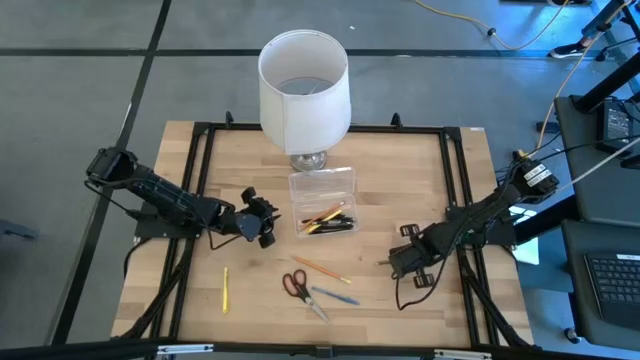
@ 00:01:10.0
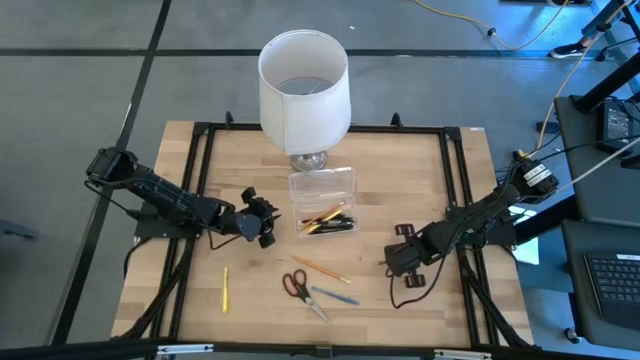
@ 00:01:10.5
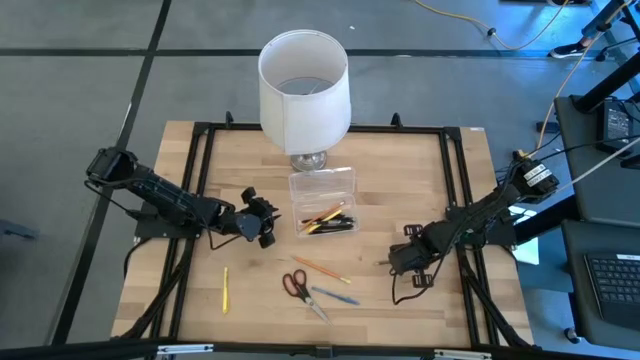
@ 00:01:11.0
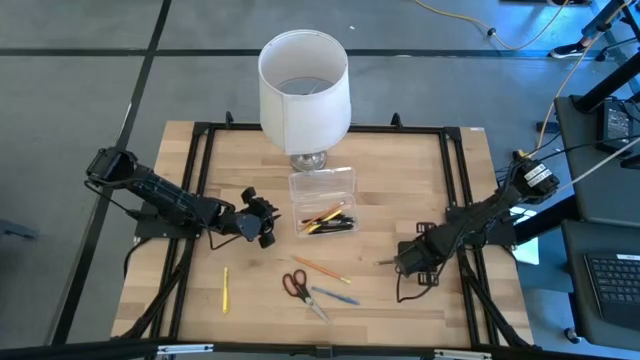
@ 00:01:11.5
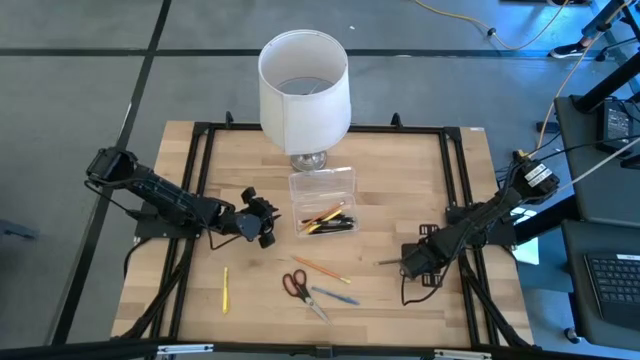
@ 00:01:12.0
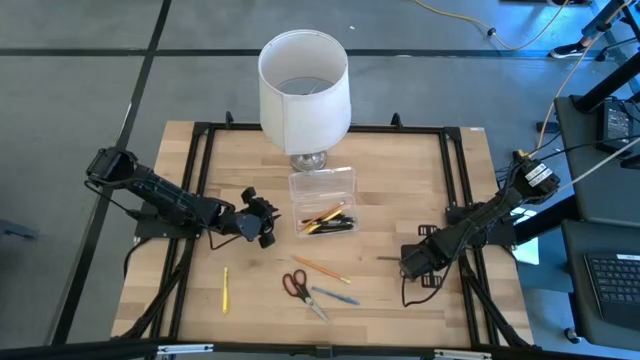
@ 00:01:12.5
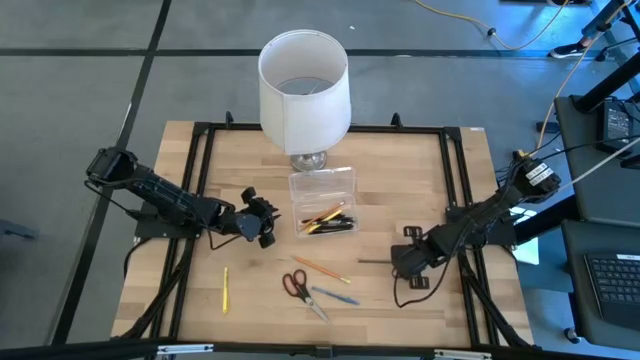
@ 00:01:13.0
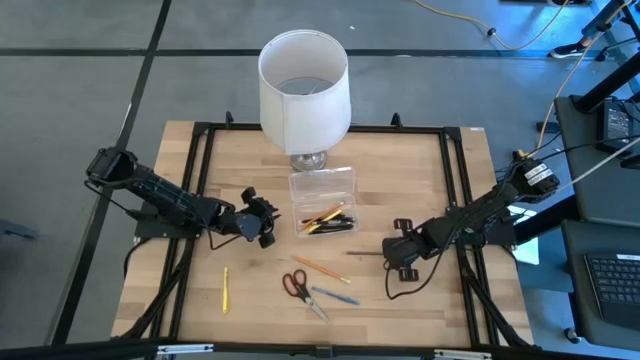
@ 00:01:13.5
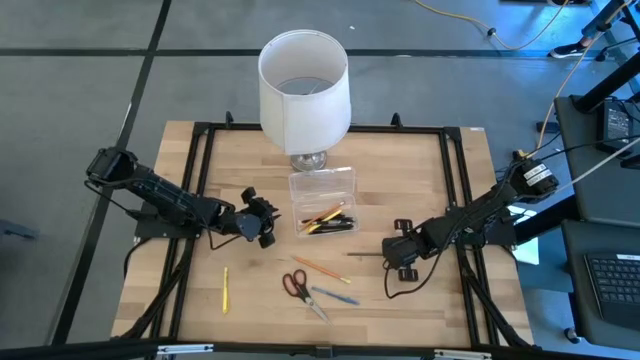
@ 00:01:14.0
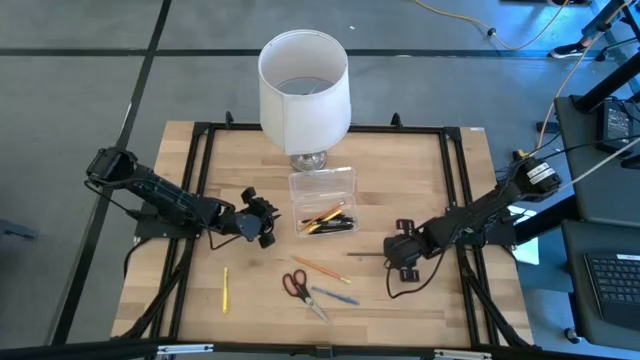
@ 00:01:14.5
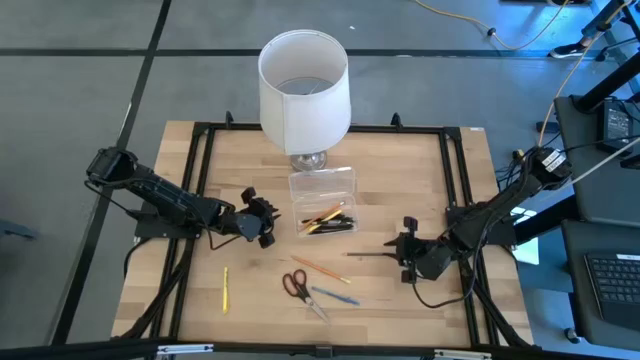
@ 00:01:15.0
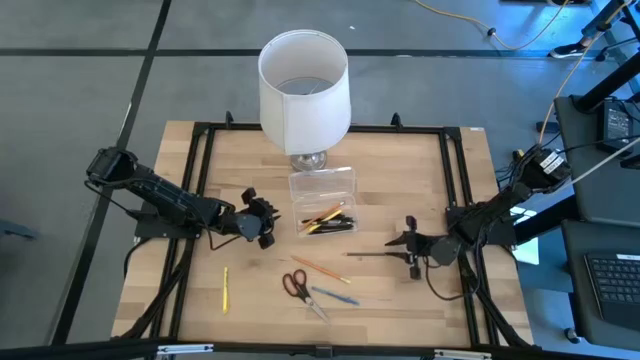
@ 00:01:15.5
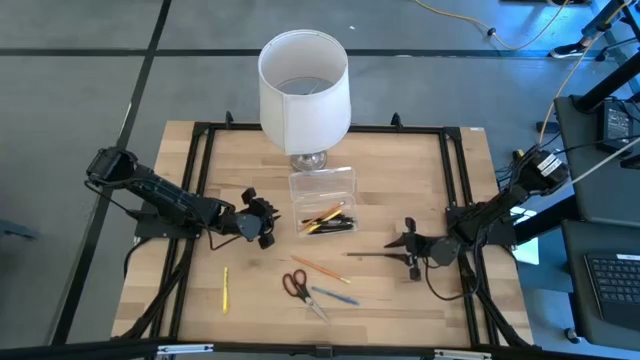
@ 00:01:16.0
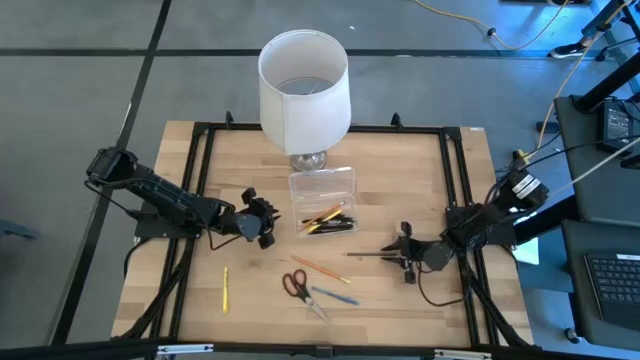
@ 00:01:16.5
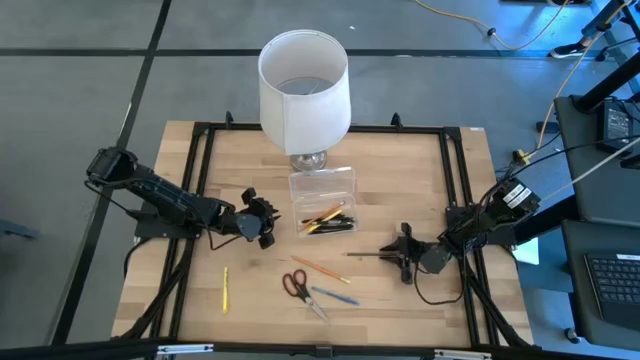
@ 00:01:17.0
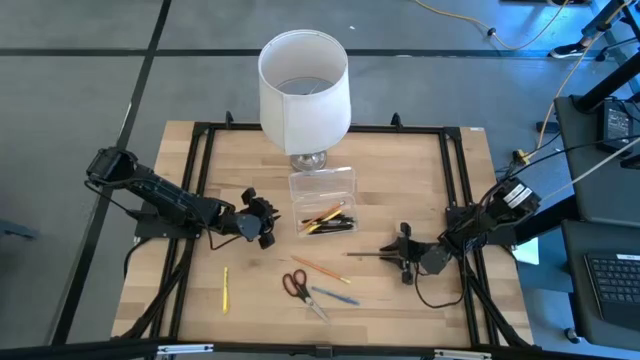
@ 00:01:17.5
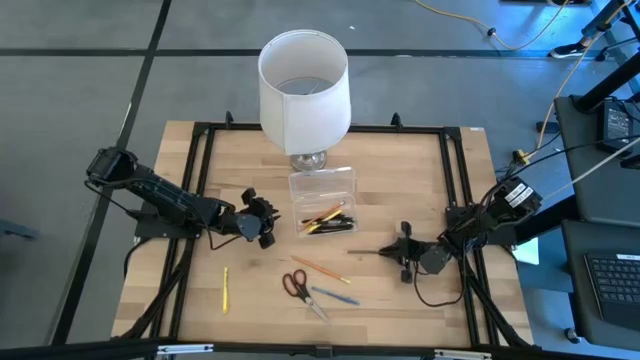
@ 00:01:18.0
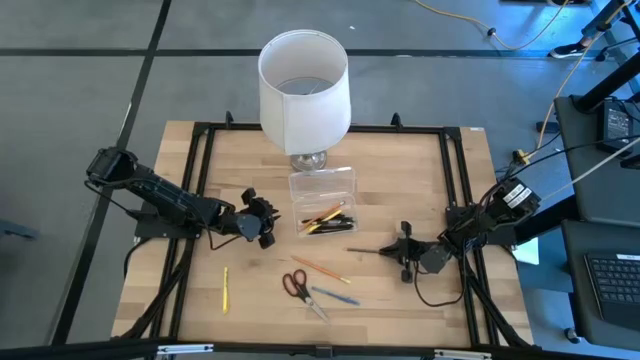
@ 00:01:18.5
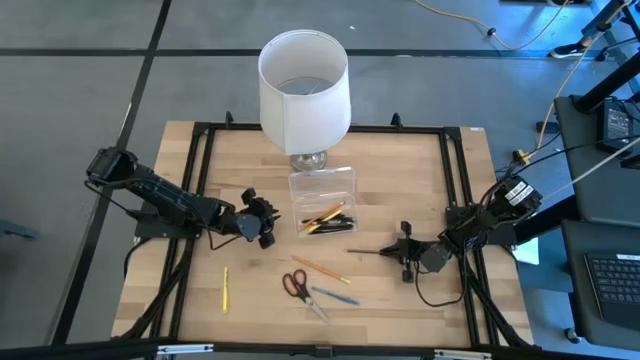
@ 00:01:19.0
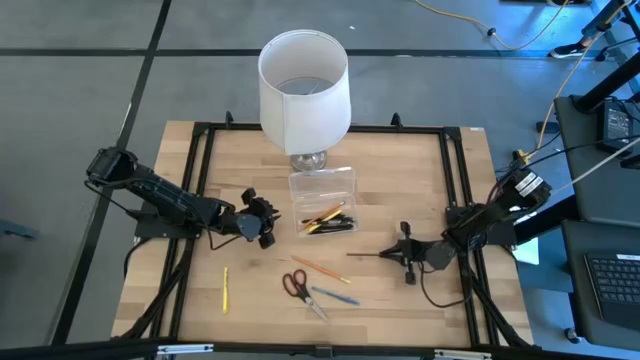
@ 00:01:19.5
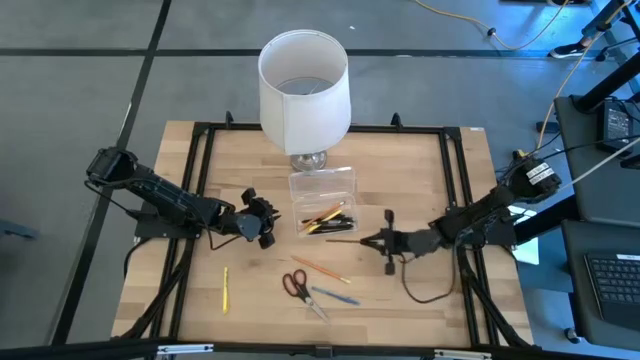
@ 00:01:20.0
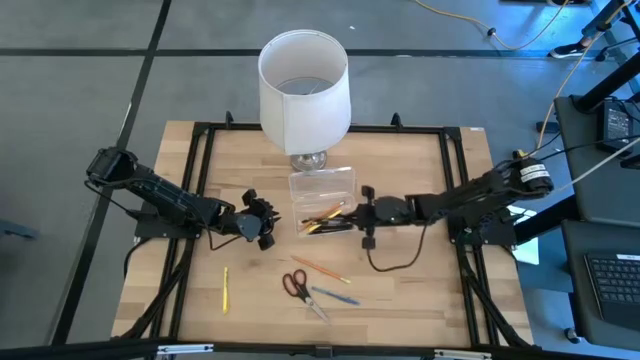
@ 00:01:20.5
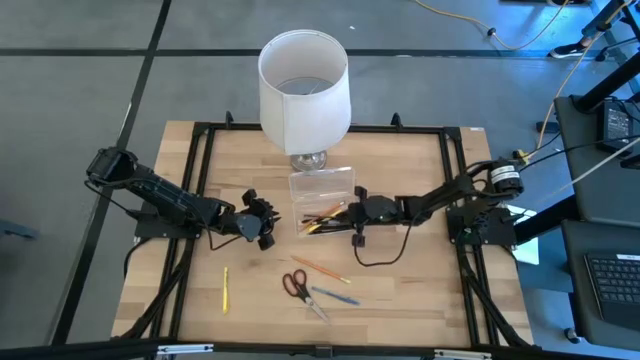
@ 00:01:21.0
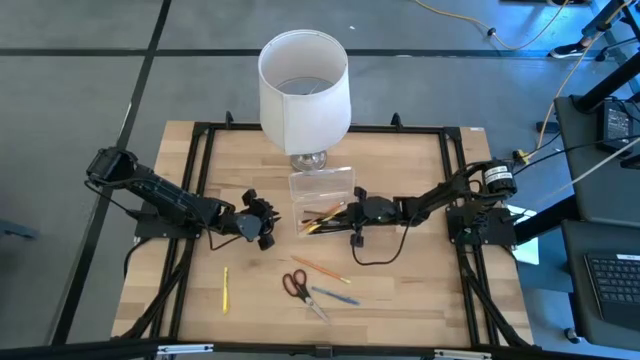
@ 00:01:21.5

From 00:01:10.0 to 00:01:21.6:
Task: Pick & place school supplies into a supply box
Put the black pencil into the transparent supply box

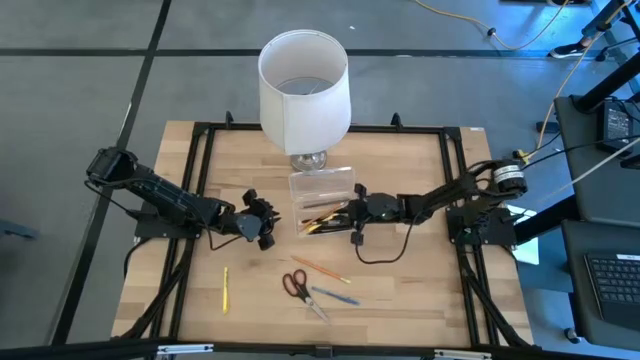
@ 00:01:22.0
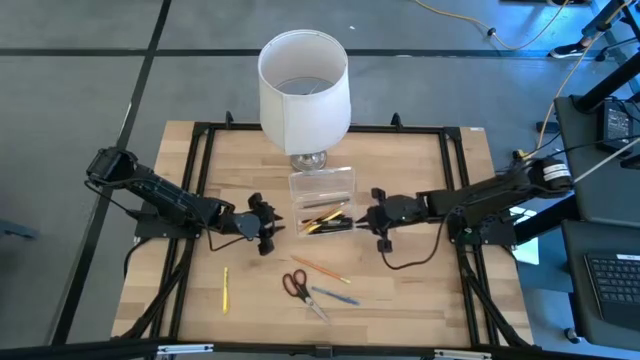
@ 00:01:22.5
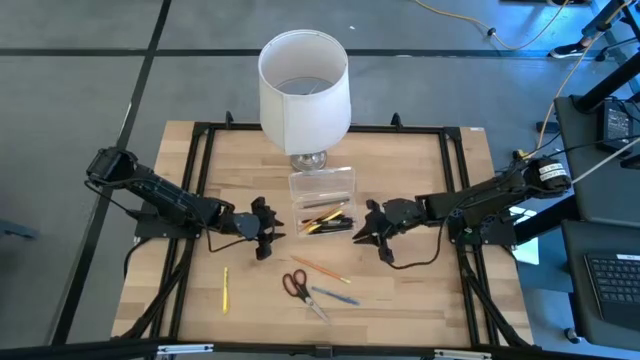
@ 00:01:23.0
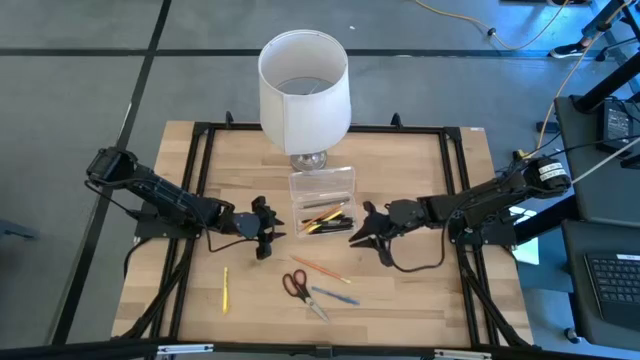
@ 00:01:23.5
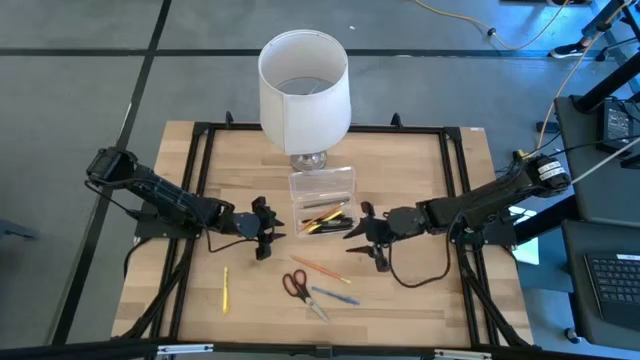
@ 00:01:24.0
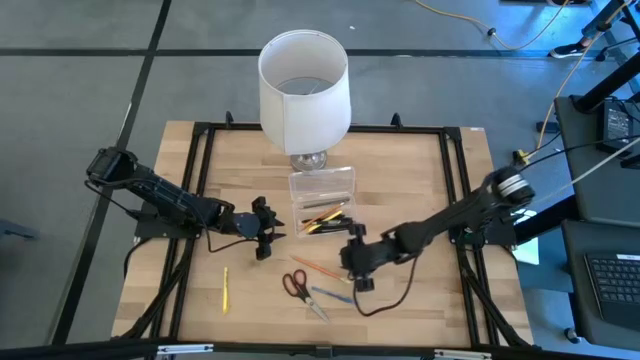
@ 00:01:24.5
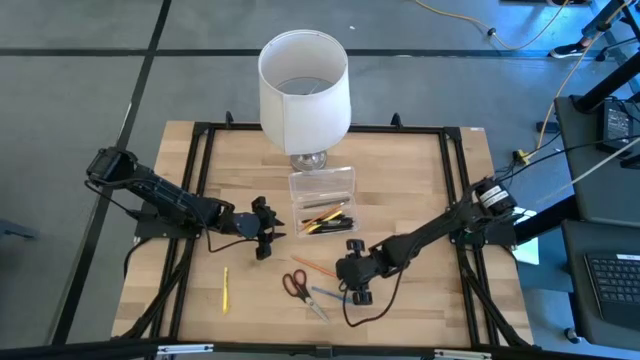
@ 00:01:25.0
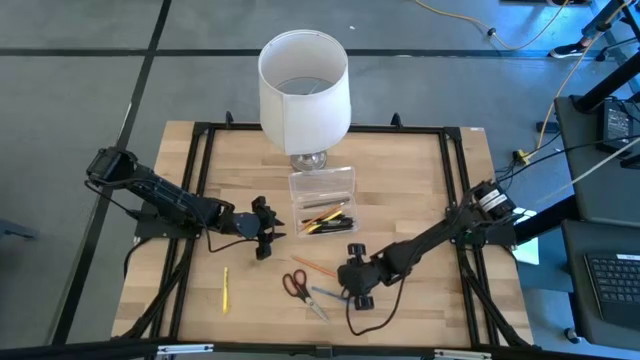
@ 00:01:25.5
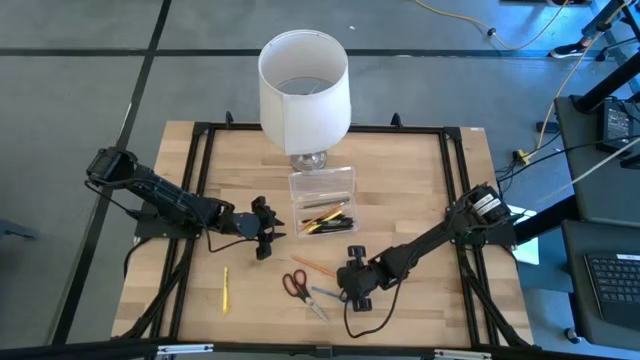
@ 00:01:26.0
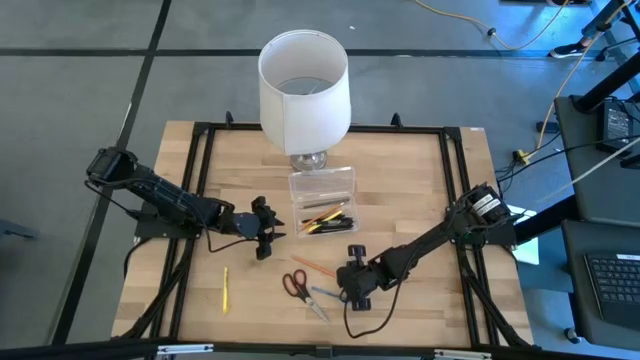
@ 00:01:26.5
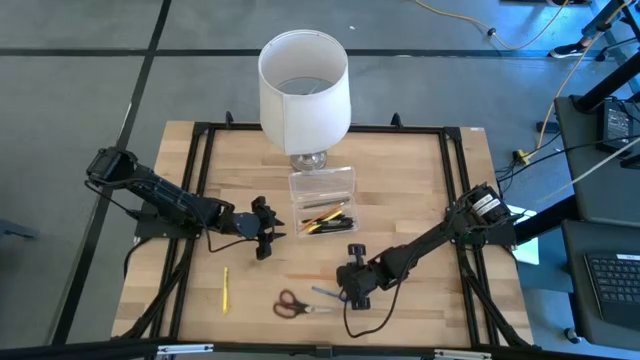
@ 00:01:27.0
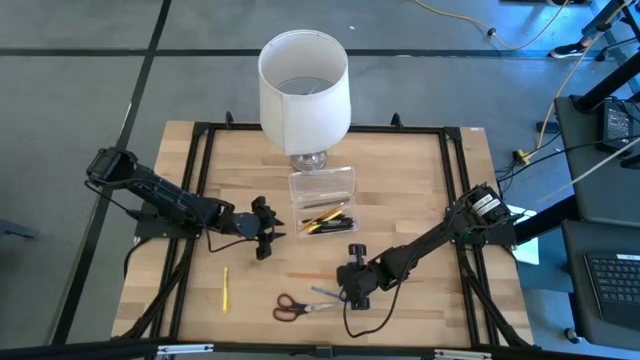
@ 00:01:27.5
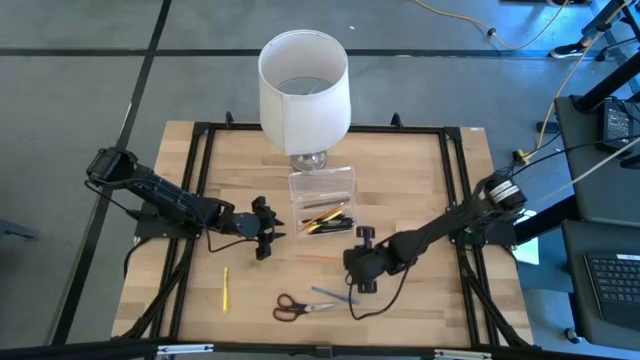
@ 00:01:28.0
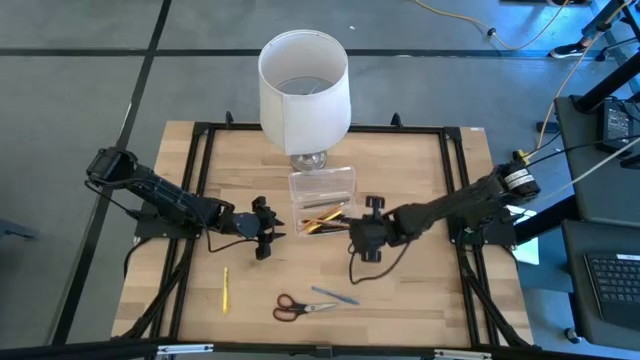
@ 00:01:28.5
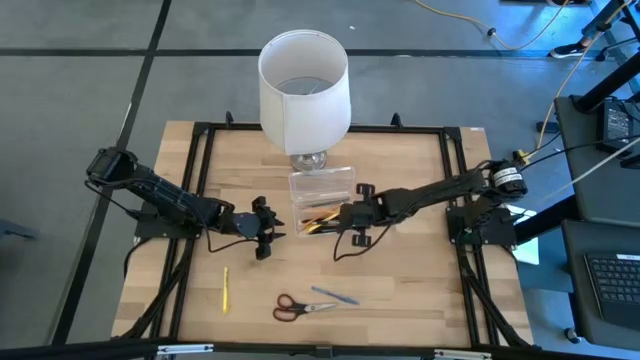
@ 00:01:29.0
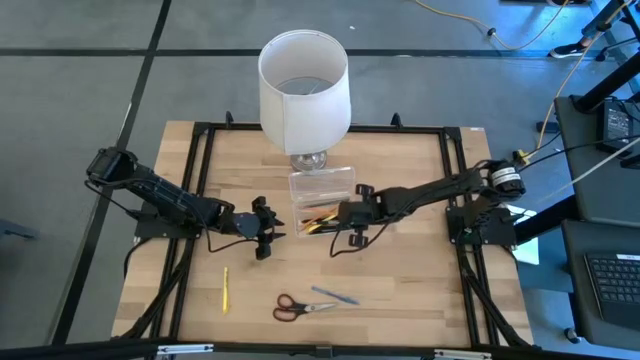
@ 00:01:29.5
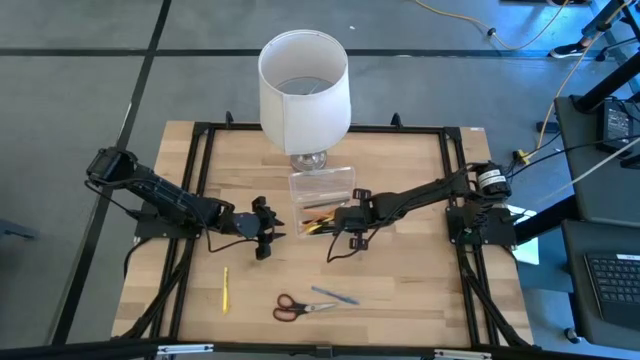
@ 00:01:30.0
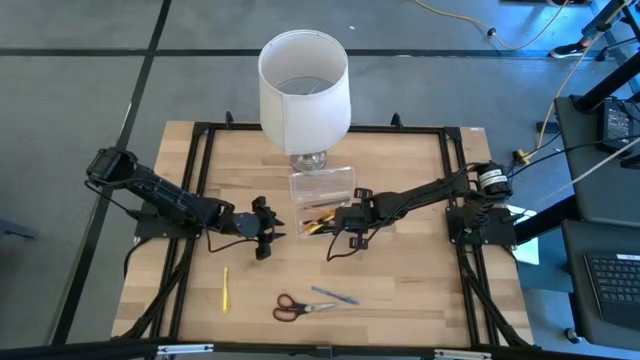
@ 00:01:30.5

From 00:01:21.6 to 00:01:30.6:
Put the orange pencil into the transparent supply box
